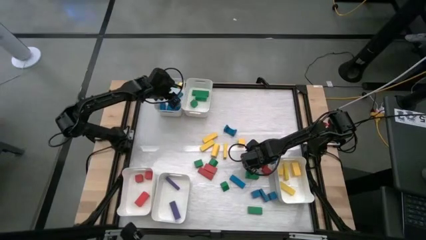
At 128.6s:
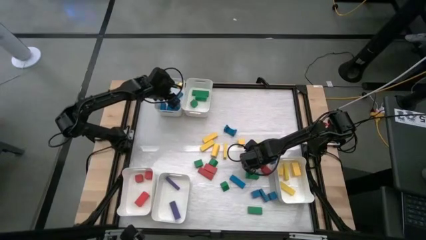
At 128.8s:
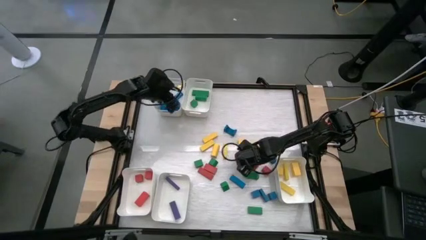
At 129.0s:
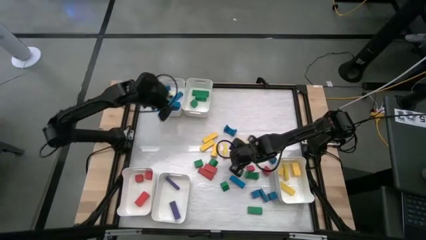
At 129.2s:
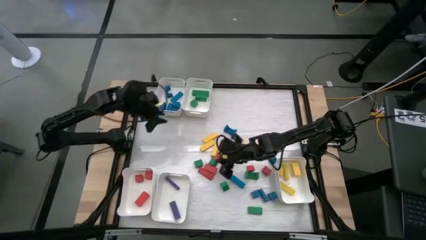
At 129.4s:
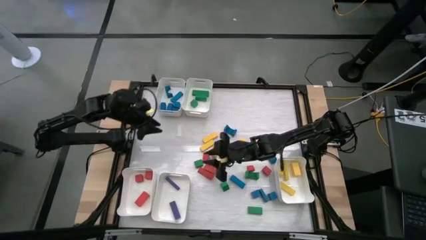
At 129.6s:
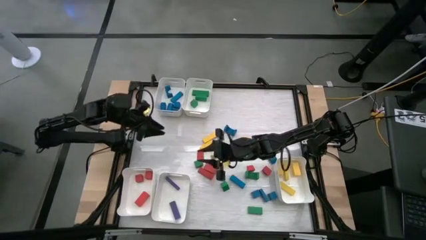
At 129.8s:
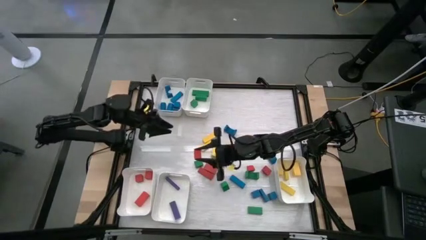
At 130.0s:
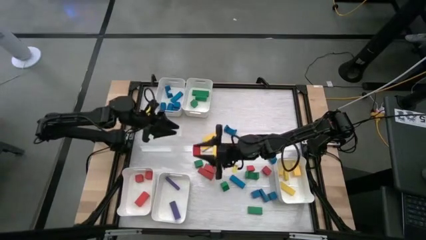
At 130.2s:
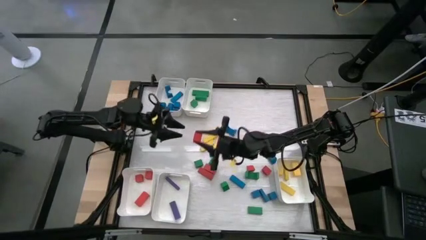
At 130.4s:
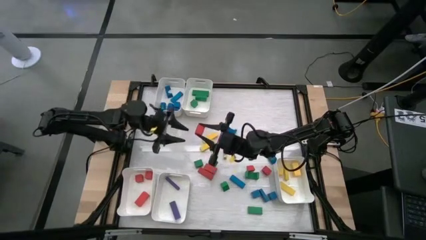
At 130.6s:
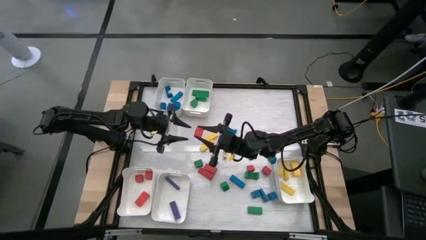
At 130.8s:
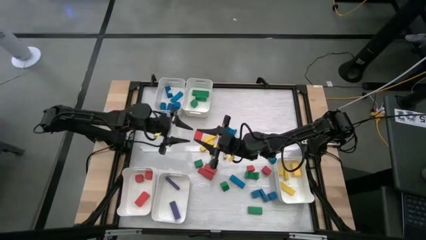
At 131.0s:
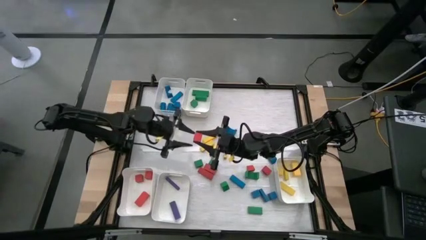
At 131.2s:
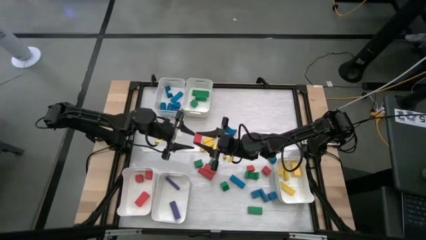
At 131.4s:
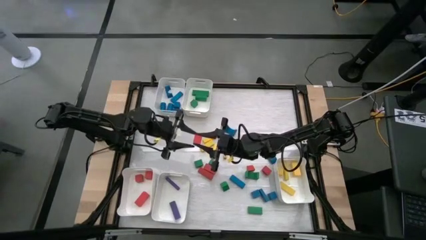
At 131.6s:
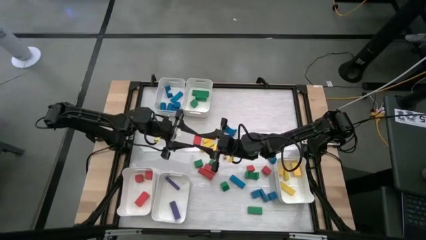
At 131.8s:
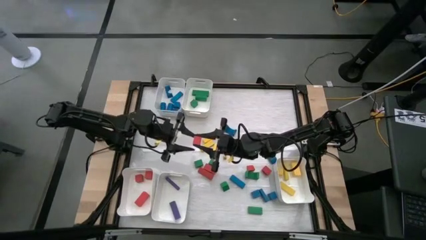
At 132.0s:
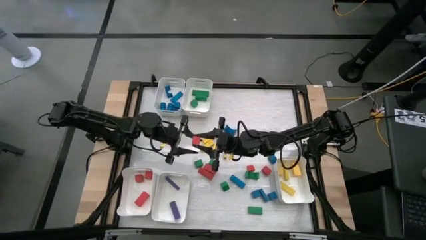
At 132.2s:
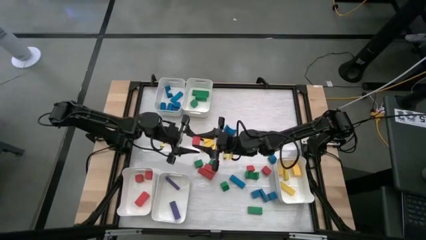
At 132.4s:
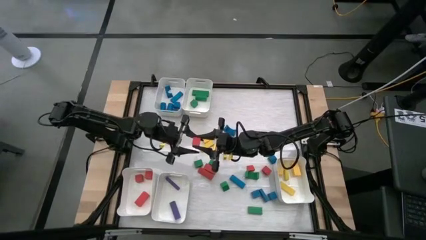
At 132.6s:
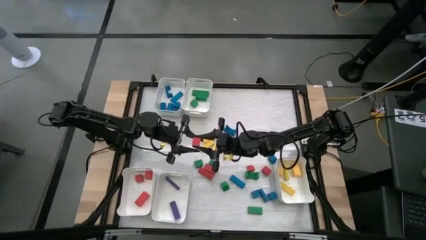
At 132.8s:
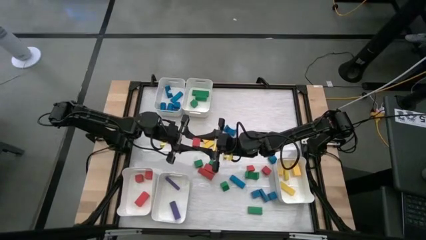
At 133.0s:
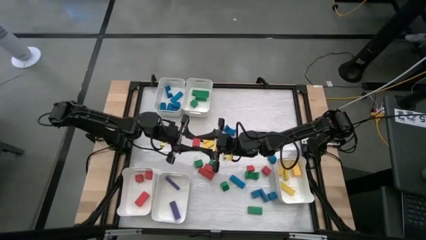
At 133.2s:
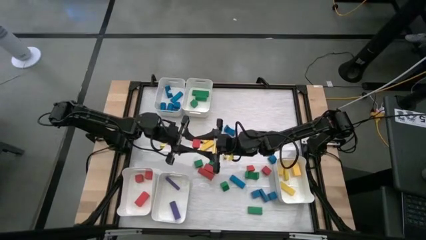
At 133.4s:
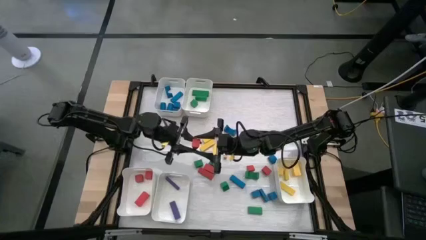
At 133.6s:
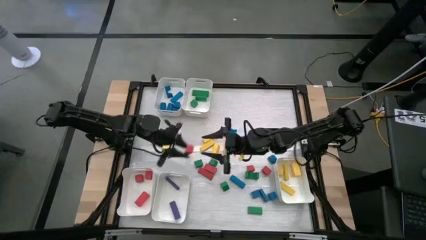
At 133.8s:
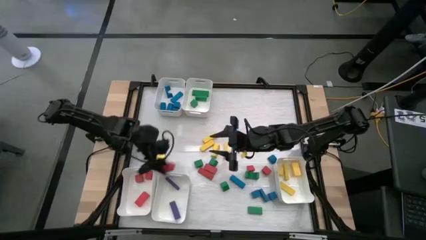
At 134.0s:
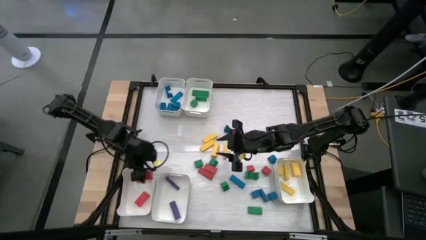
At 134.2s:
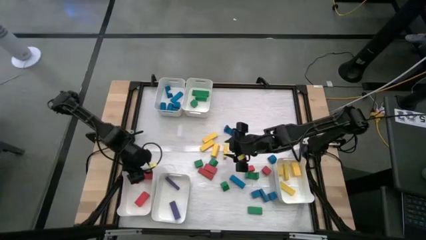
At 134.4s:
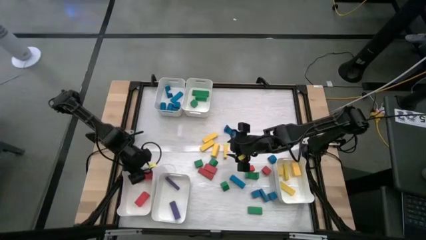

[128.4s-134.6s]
Task: Sort blocks
Put the red block into the bottom left white bin

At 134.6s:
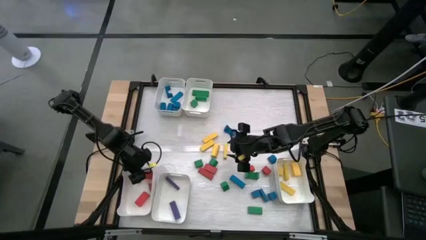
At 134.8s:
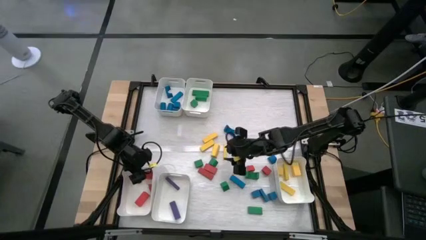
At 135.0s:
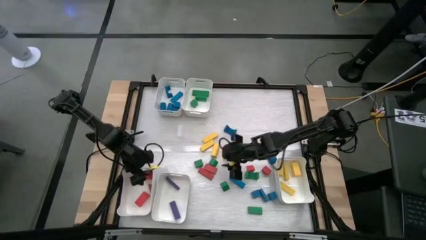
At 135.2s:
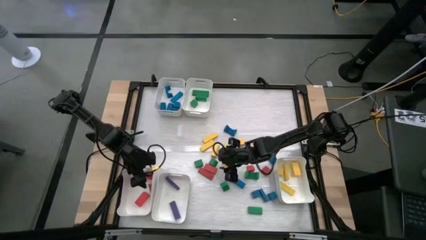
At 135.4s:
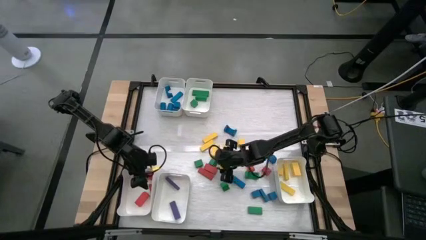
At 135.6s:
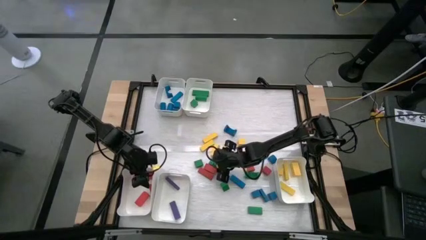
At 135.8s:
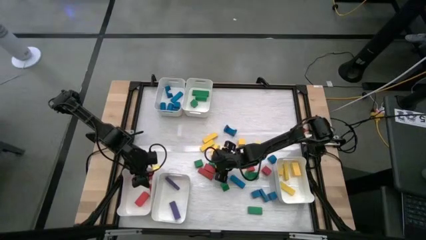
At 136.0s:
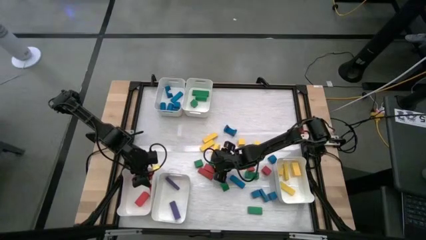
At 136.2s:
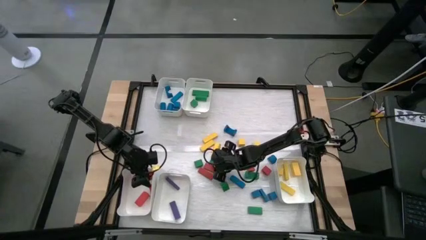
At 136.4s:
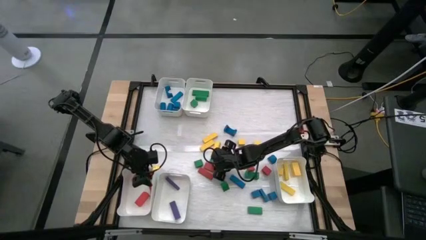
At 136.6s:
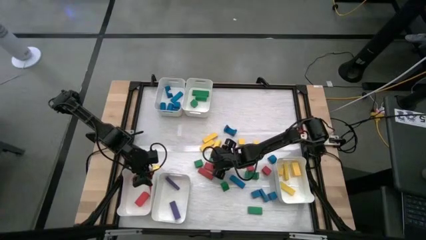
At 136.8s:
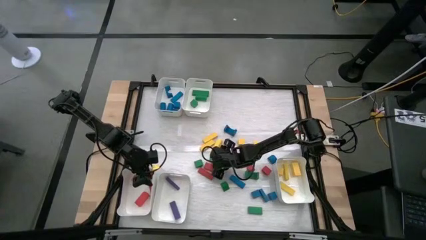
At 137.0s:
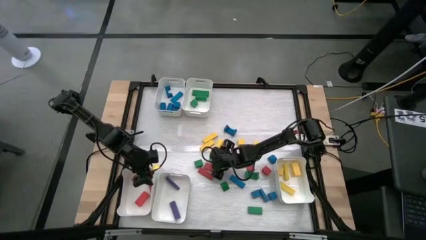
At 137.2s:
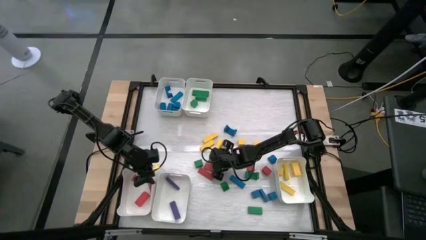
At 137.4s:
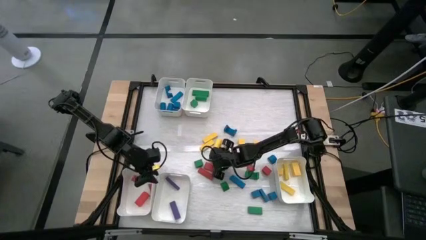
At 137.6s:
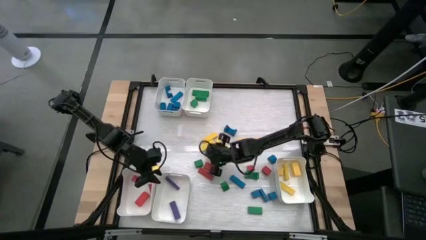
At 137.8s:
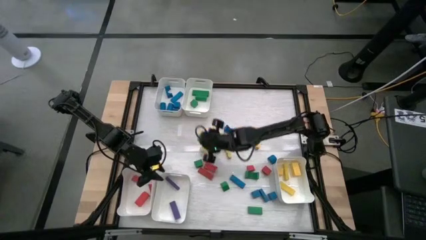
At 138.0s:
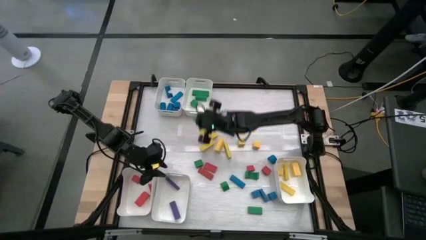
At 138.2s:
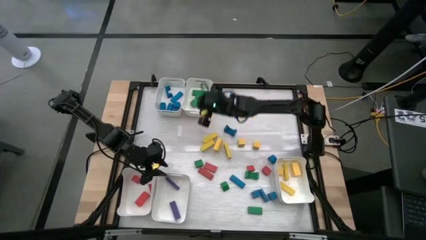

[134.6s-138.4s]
Put the green block into the top right white bin

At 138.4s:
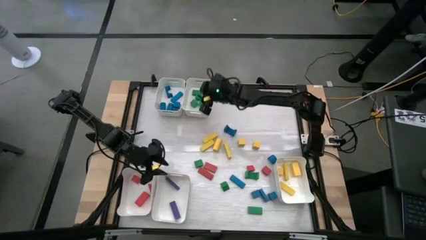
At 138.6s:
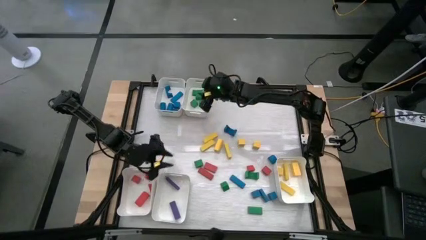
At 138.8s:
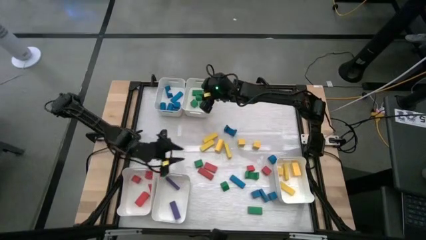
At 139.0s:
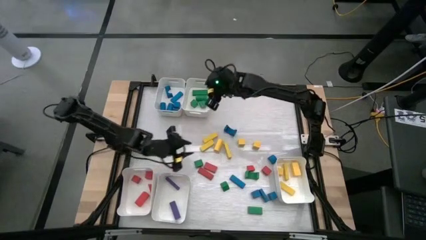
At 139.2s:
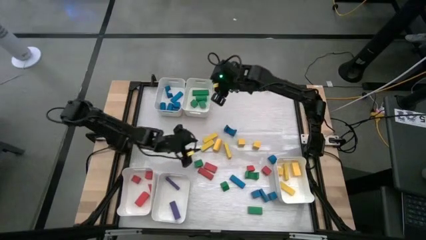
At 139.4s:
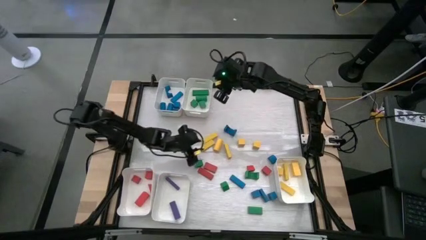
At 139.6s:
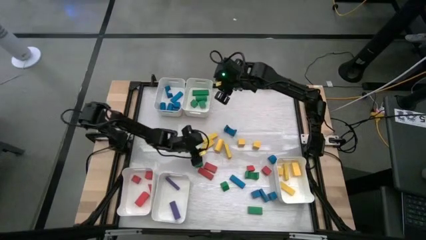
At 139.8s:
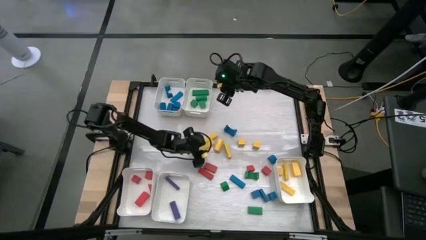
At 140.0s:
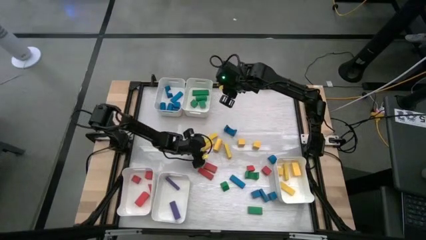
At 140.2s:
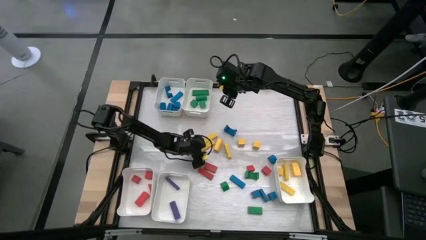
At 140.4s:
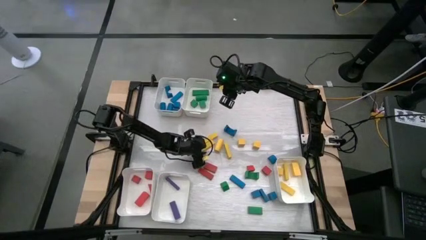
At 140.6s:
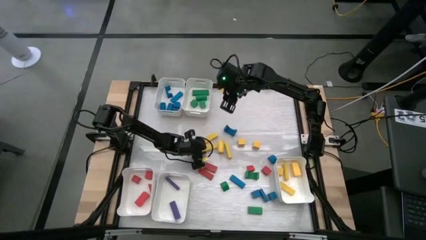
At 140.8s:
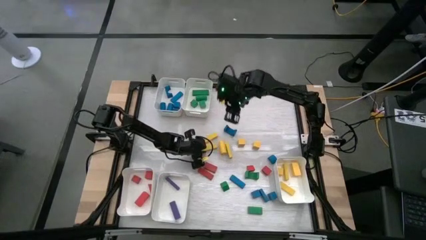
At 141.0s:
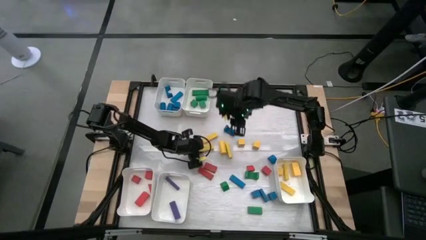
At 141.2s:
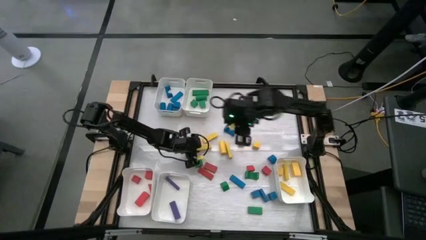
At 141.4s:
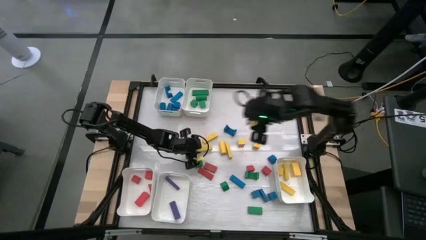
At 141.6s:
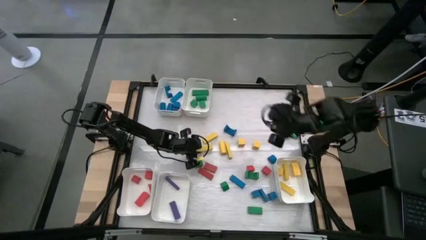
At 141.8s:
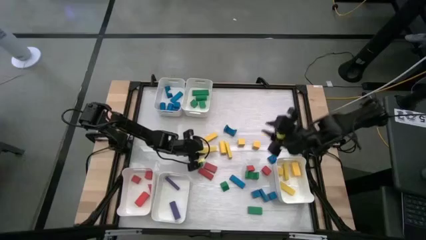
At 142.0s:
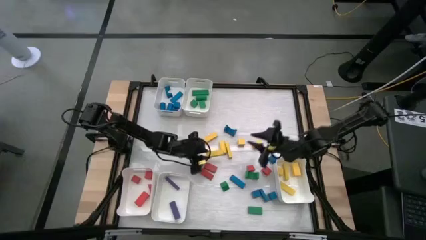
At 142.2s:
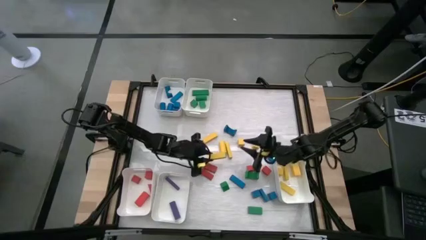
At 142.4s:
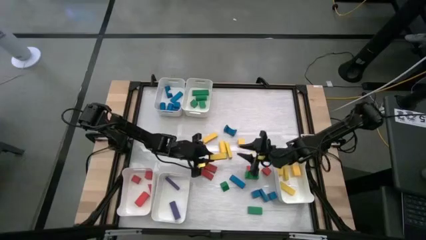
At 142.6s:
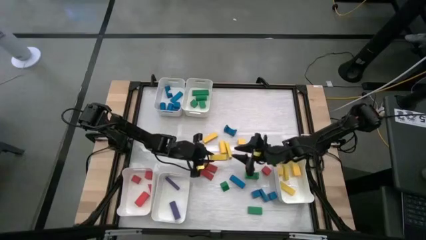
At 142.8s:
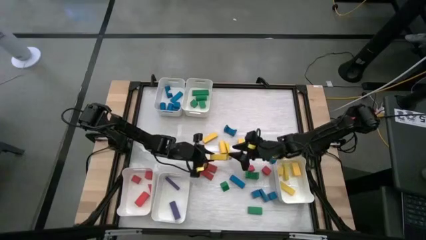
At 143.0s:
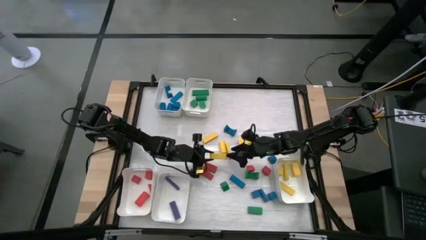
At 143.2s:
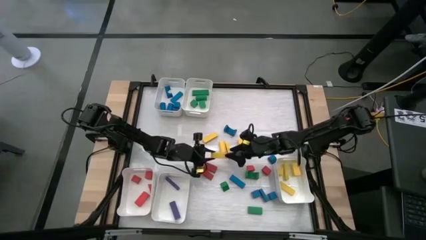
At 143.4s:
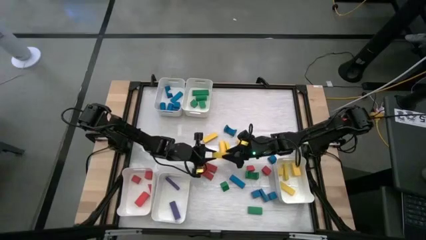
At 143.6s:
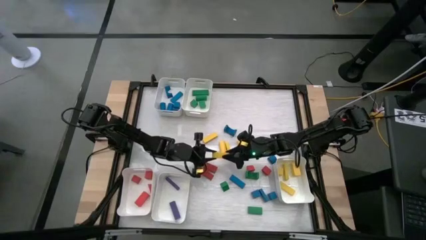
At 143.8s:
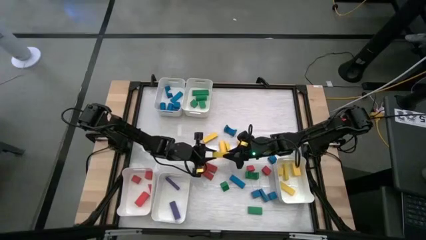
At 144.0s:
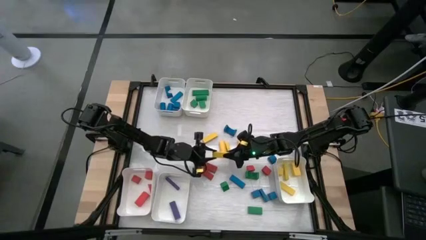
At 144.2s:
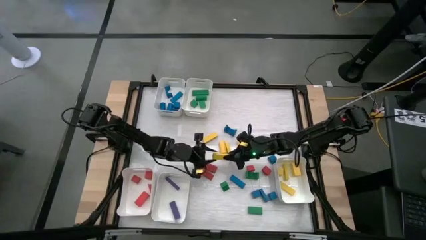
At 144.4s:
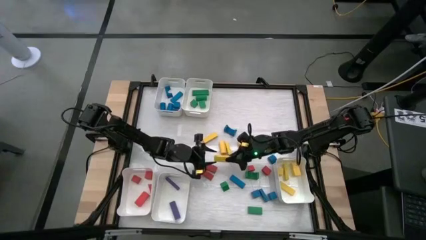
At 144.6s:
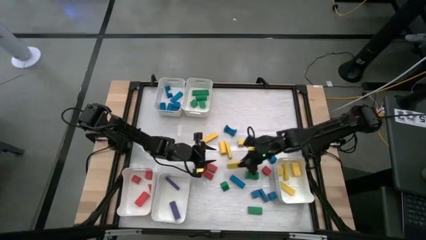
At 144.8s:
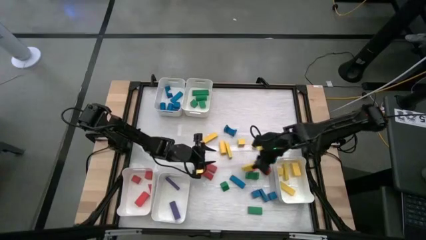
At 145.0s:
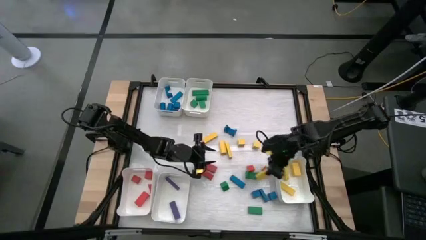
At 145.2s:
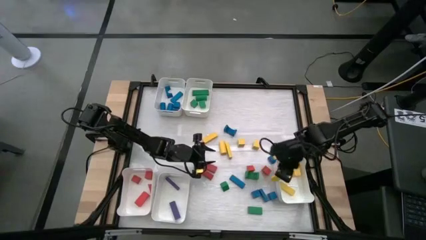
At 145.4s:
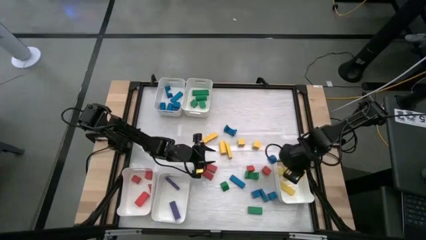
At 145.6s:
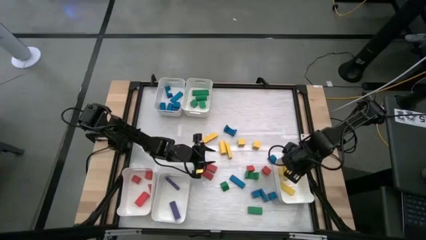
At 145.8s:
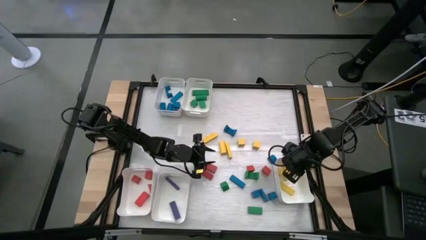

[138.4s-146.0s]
Put the yellow block into the bottom right white bin
